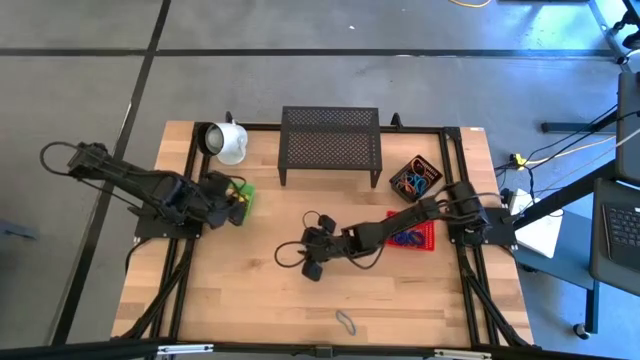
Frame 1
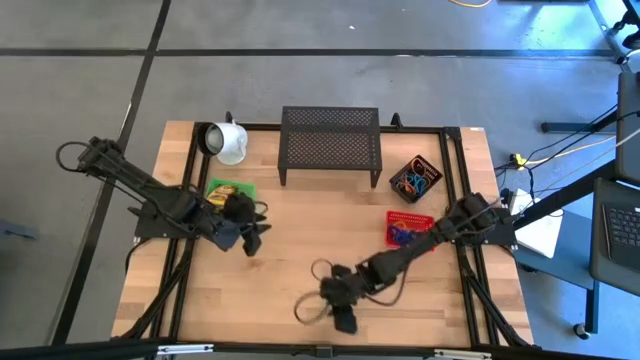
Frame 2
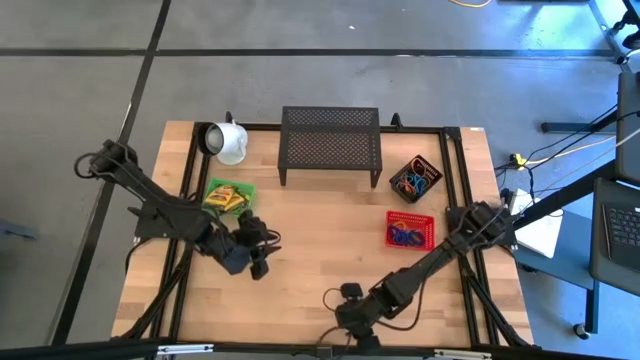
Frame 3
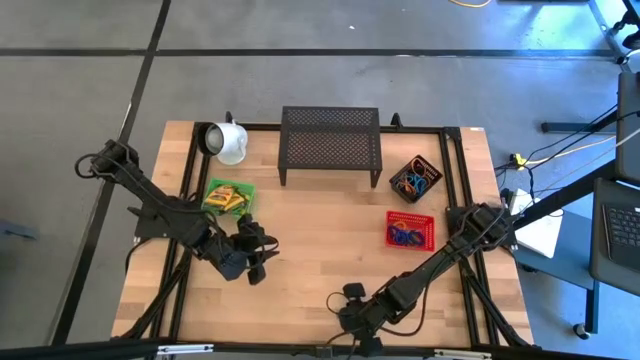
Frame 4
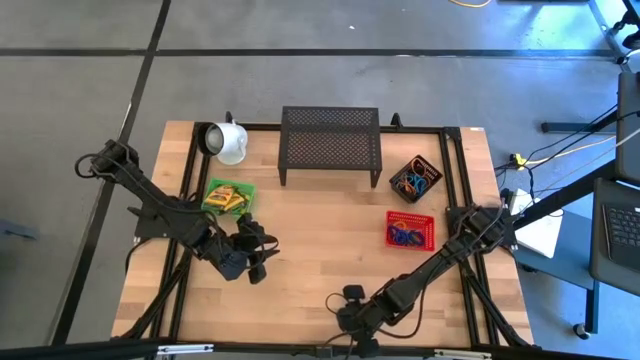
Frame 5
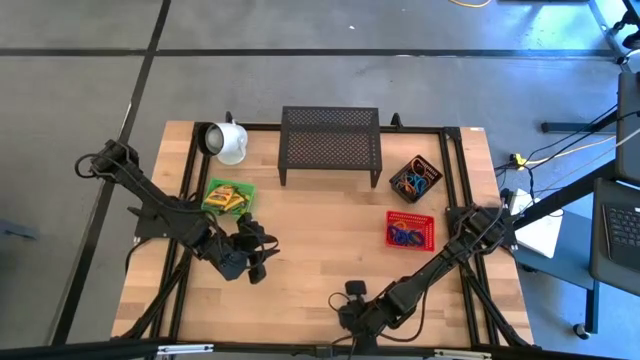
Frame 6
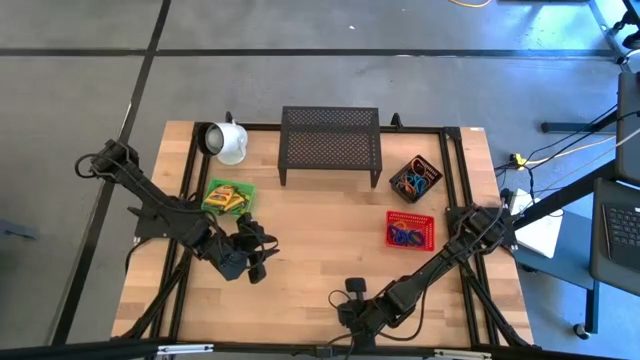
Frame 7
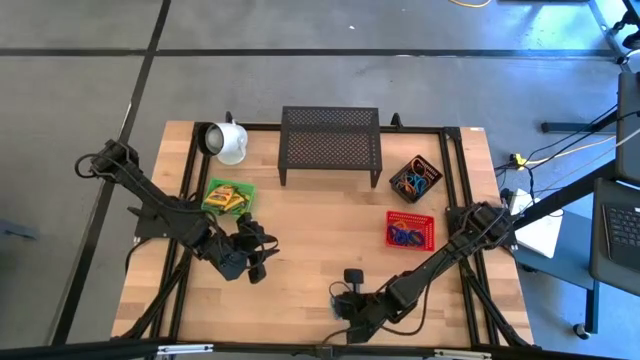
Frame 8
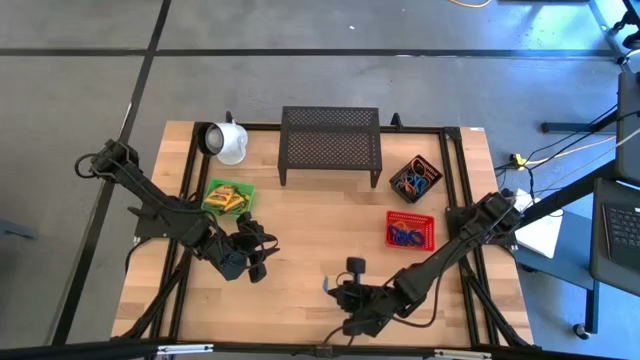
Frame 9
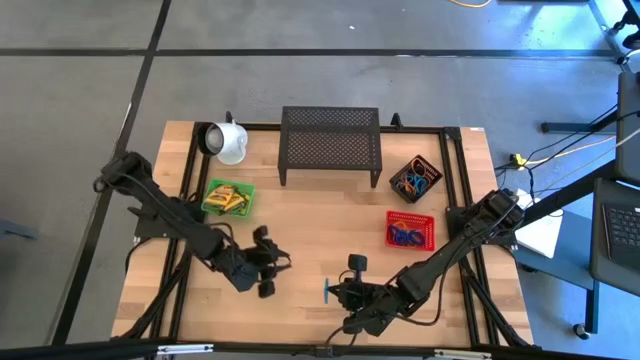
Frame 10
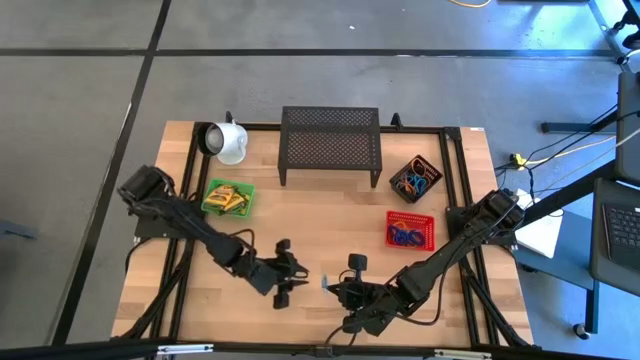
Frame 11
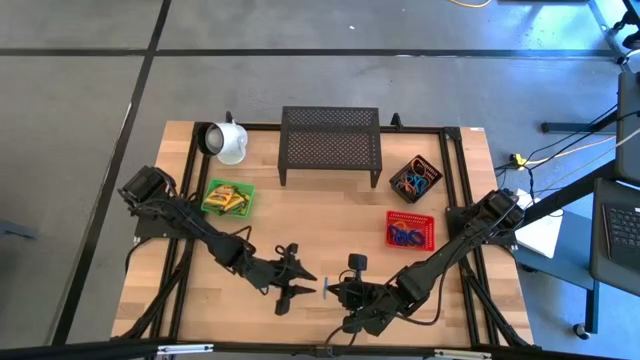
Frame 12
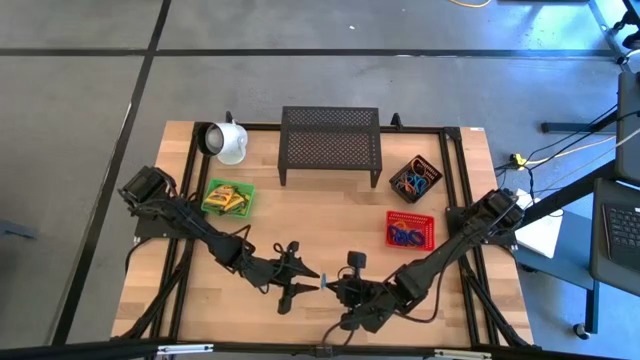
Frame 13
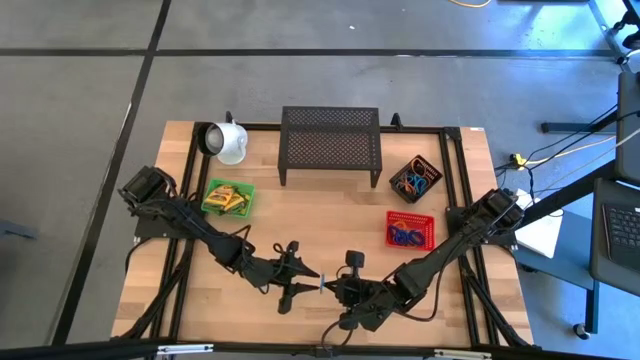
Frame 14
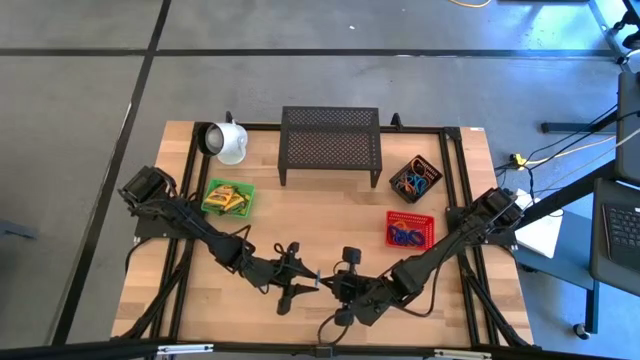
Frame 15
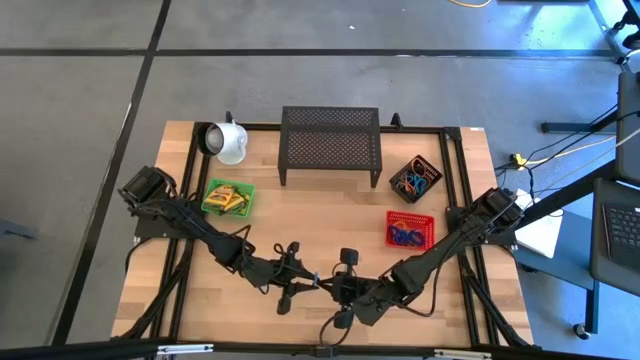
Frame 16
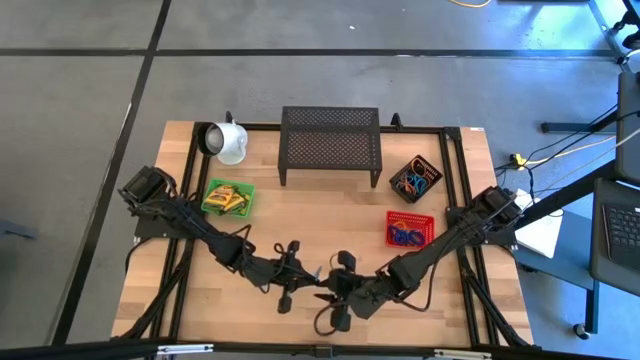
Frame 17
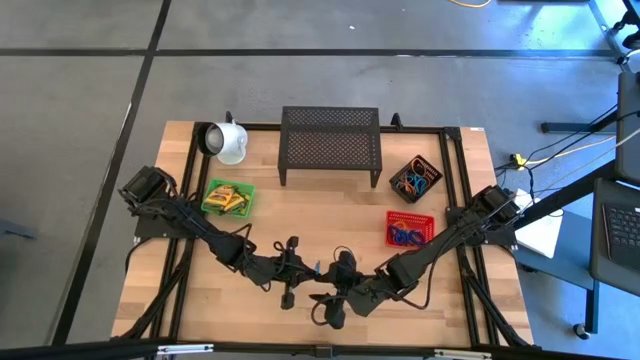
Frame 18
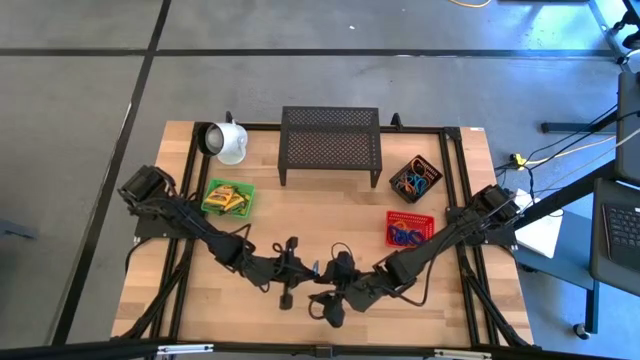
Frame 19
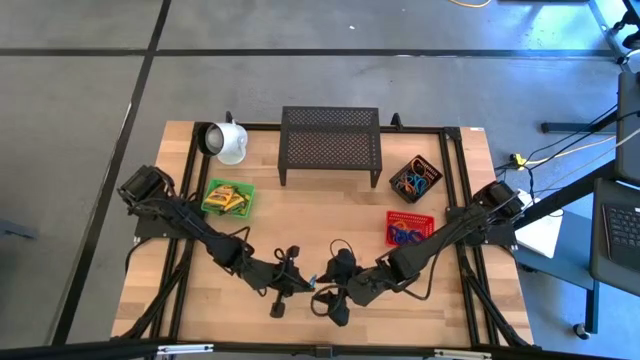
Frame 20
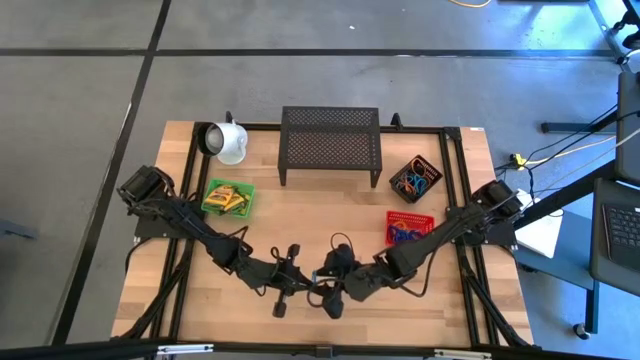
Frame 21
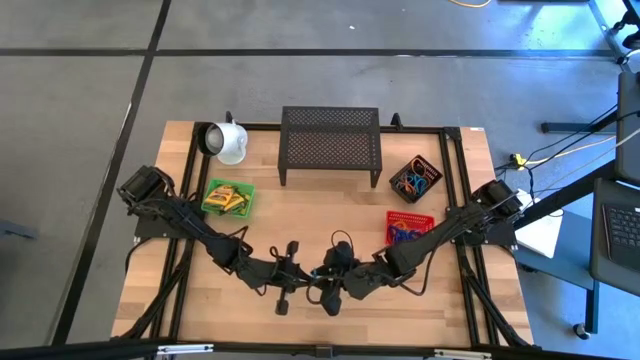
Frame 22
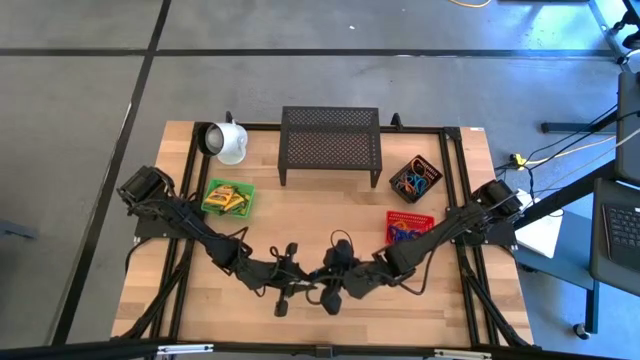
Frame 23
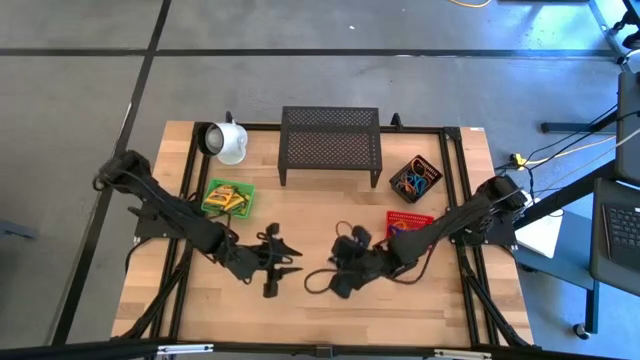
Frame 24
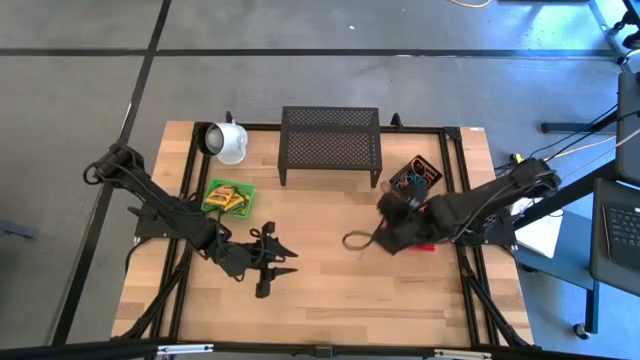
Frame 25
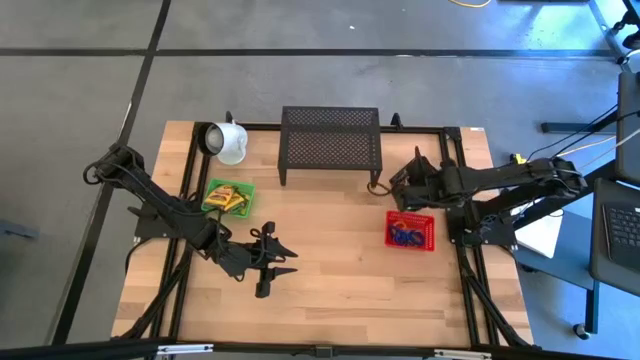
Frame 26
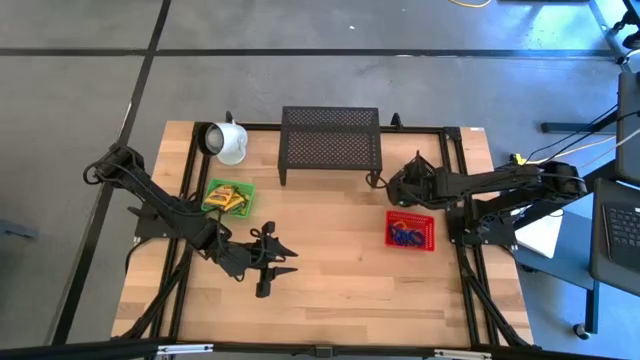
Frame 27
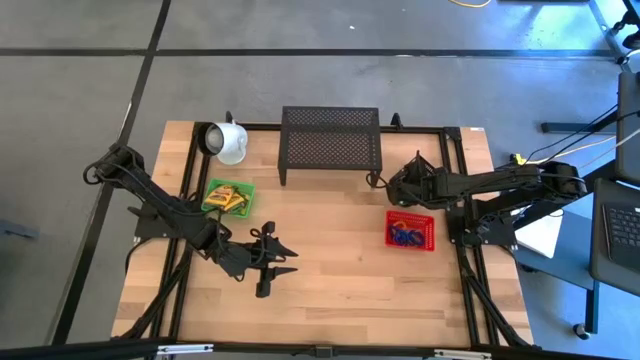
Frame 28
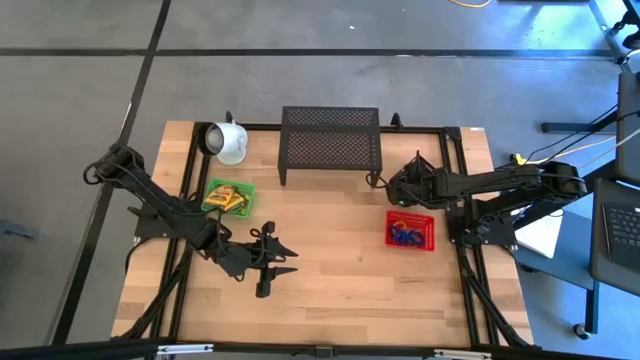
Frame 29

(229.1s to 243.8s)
Task: Pick & Place Office Desk Supplies
Put the blue rubber band band into the black bin

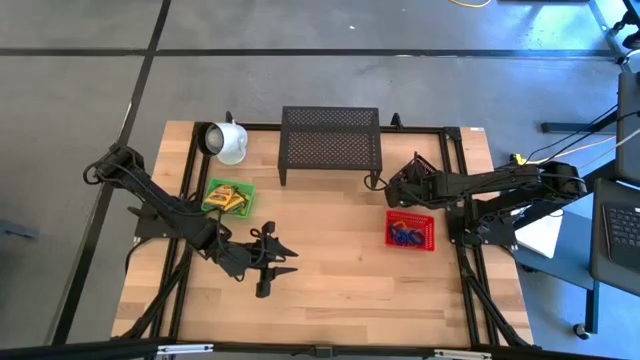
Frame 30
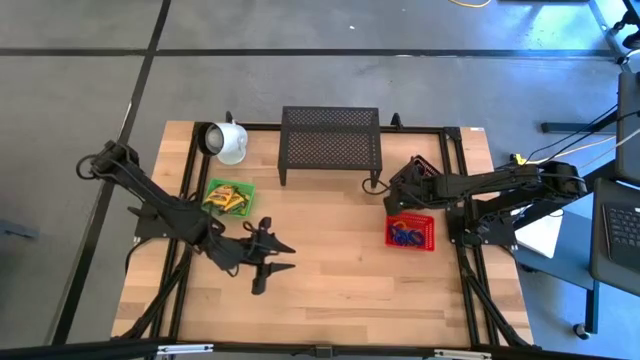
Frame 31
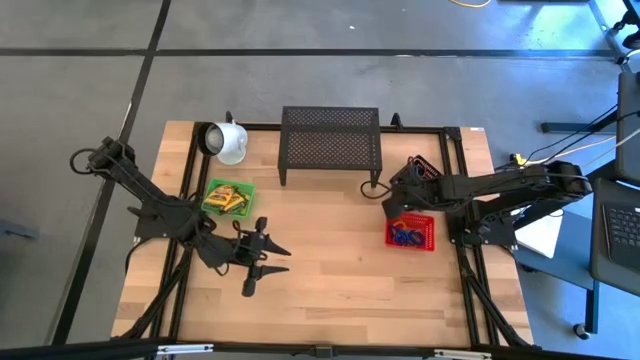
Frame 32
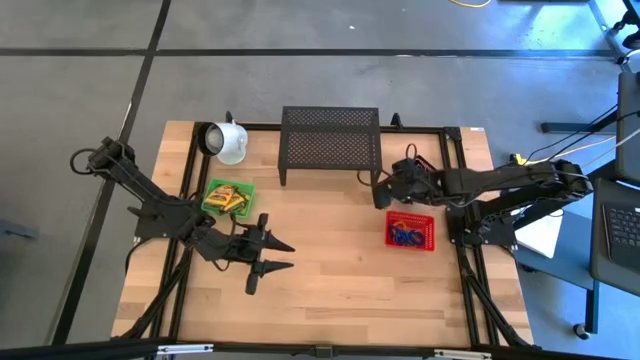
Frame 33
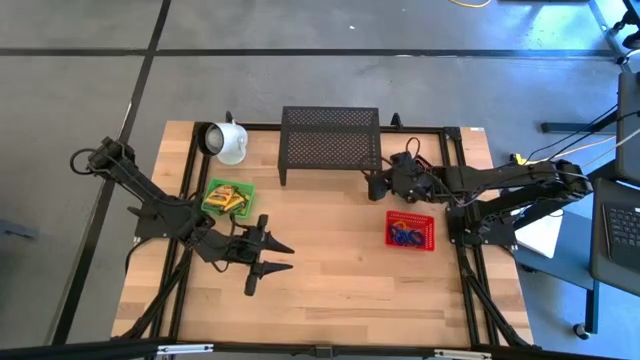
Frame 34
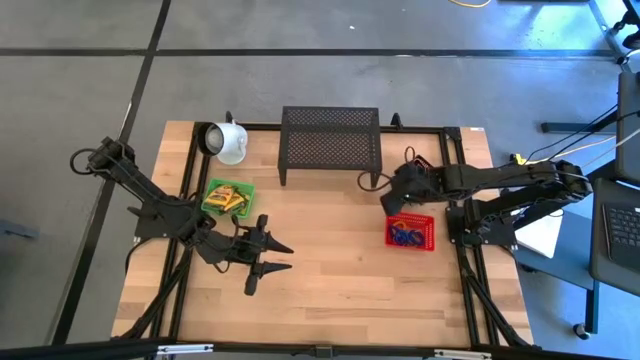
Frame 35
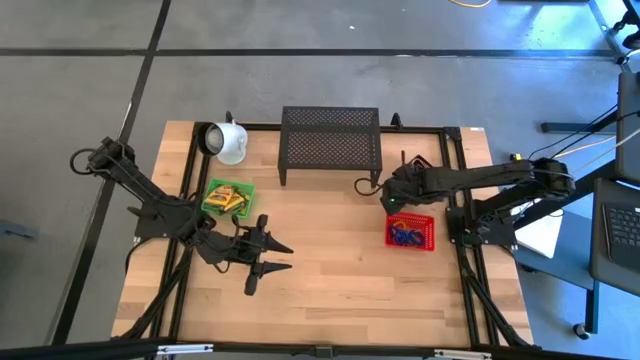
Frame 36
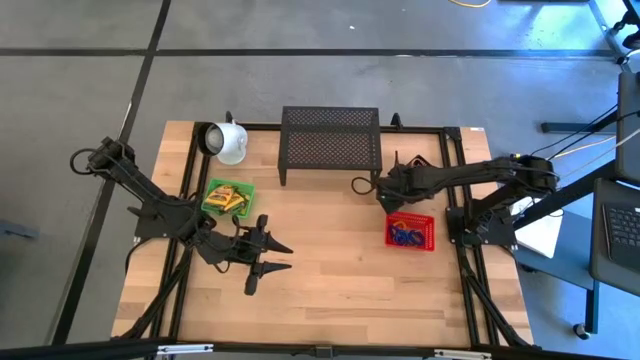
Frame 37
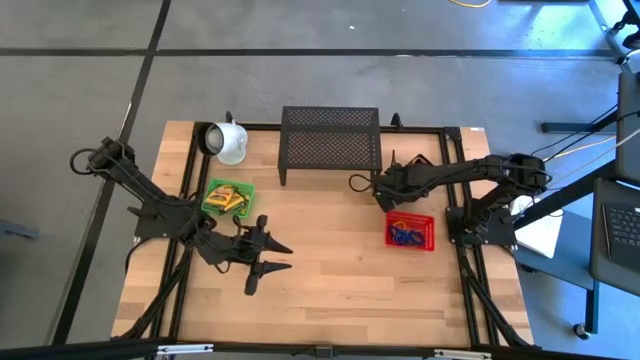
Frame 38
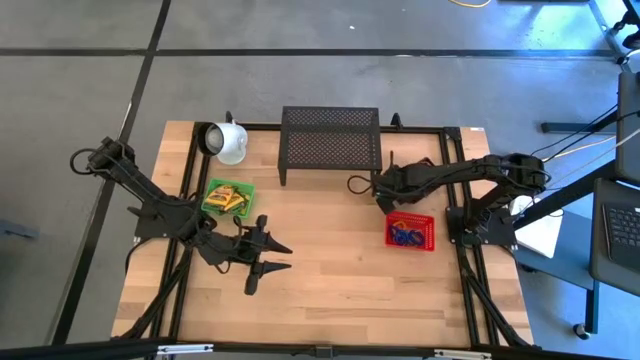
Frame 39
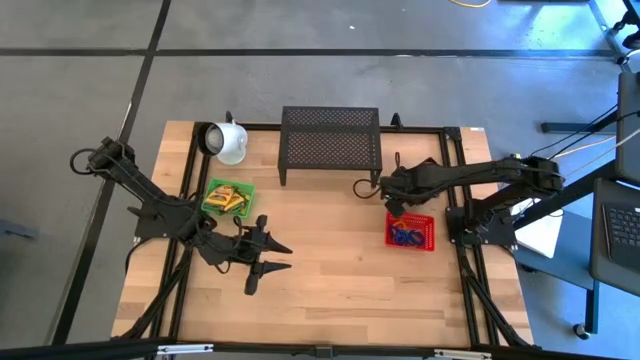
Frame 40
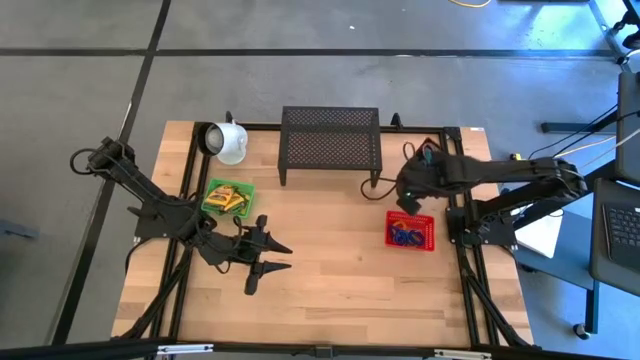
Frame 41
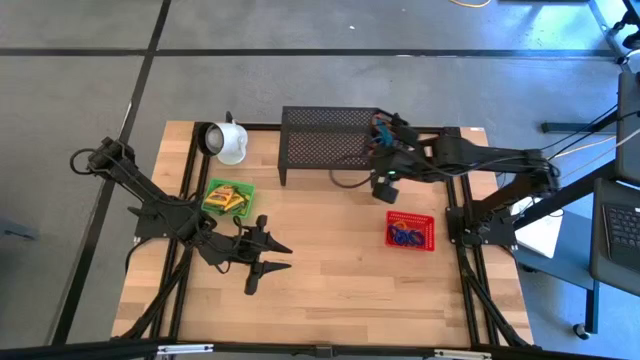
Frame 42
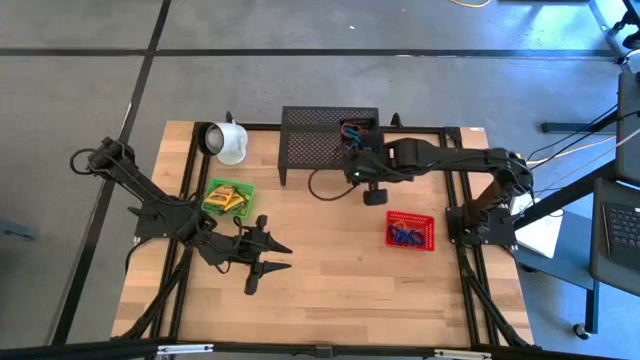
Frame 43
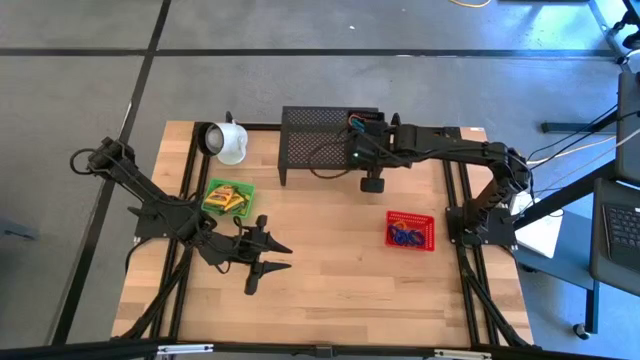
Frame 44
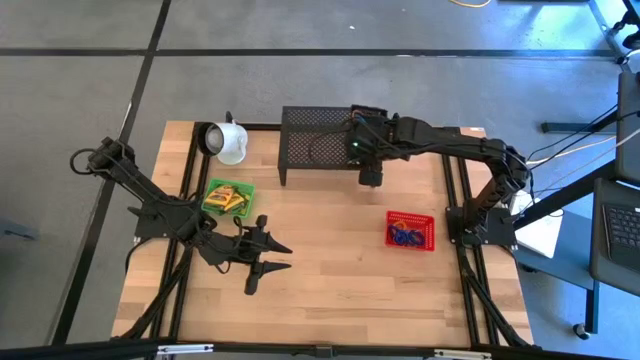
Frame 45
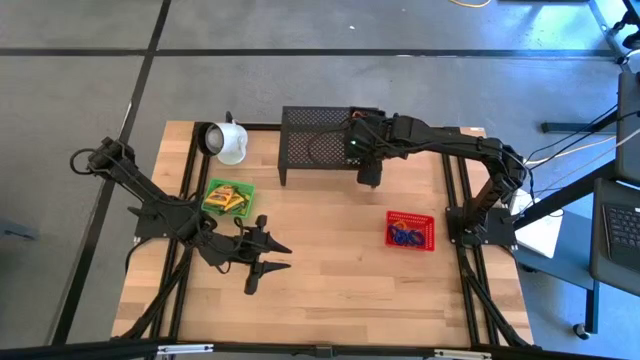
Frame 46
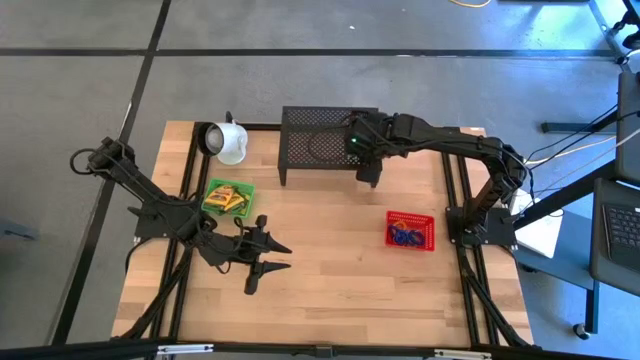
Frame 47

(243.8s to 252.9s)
Put the black bin on the shelf
